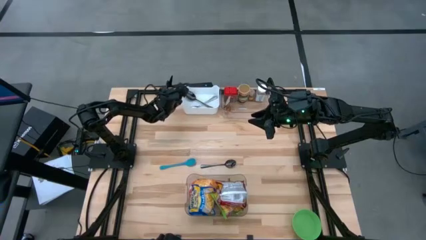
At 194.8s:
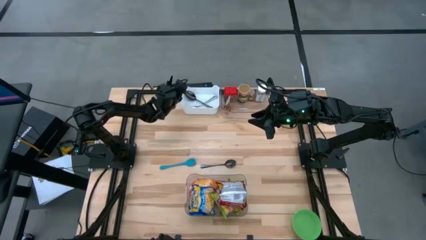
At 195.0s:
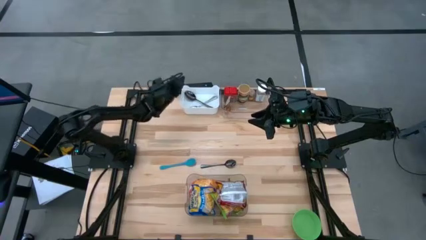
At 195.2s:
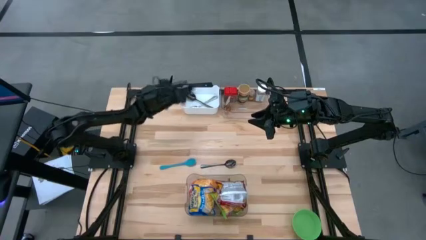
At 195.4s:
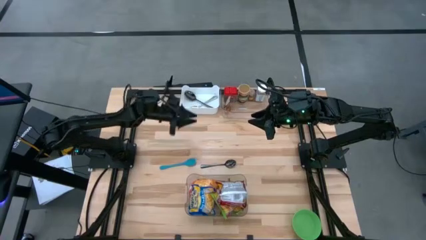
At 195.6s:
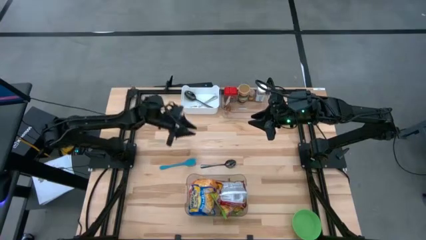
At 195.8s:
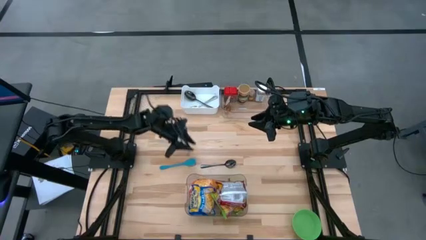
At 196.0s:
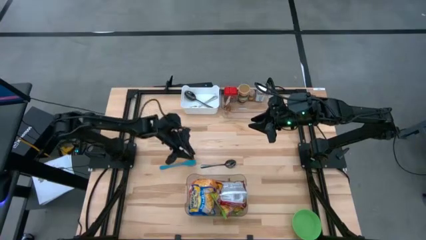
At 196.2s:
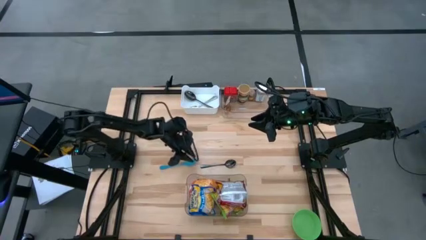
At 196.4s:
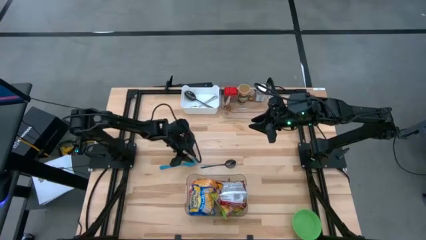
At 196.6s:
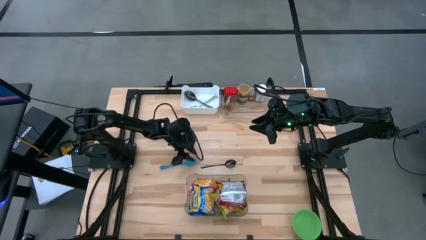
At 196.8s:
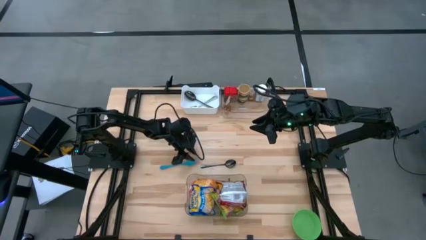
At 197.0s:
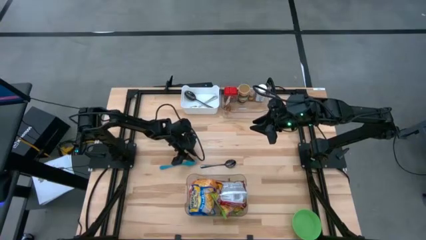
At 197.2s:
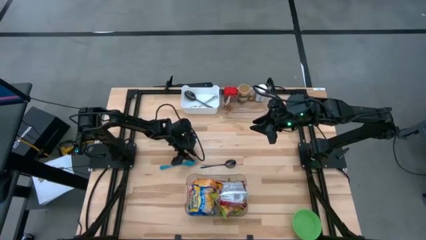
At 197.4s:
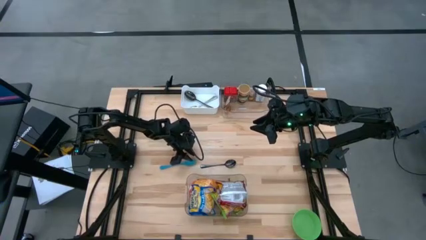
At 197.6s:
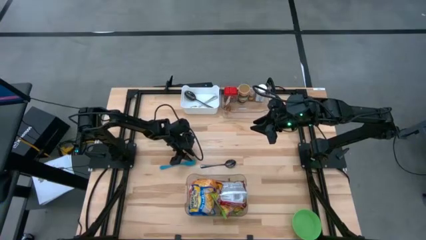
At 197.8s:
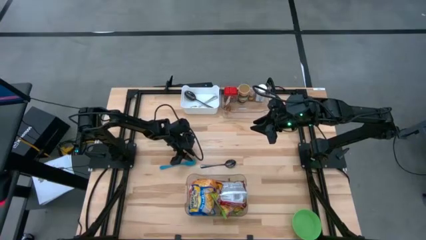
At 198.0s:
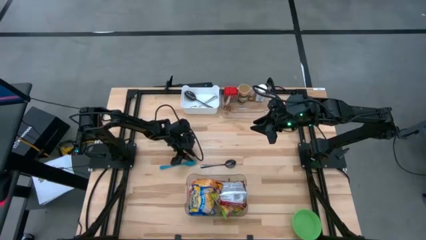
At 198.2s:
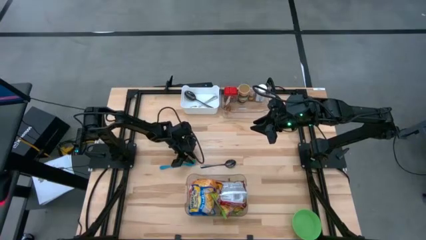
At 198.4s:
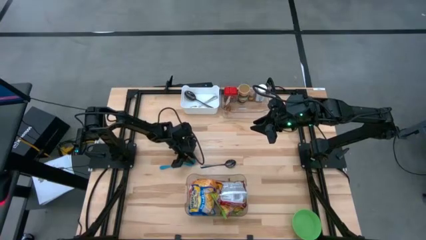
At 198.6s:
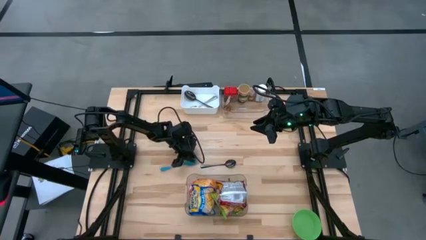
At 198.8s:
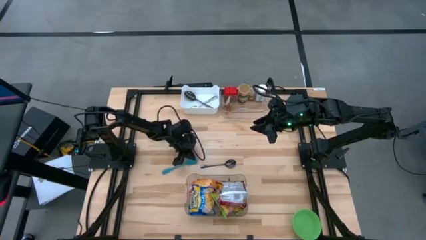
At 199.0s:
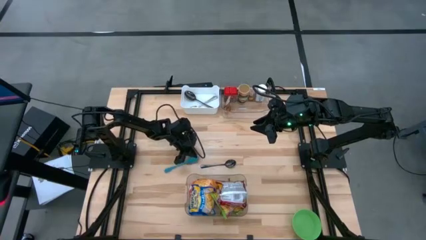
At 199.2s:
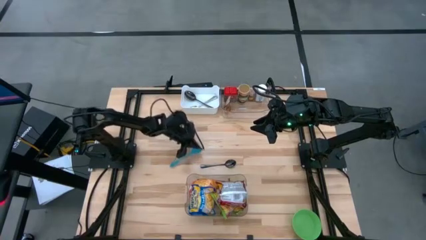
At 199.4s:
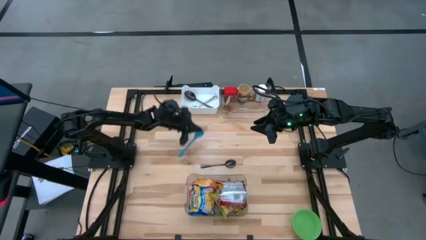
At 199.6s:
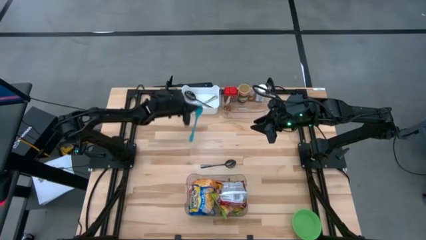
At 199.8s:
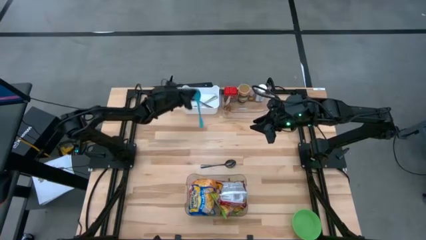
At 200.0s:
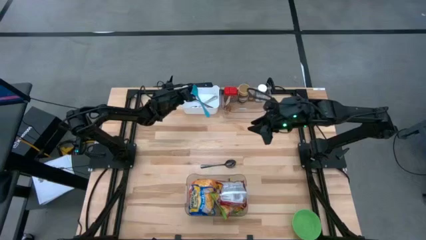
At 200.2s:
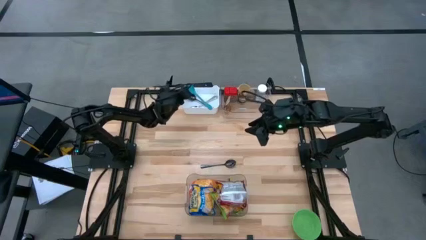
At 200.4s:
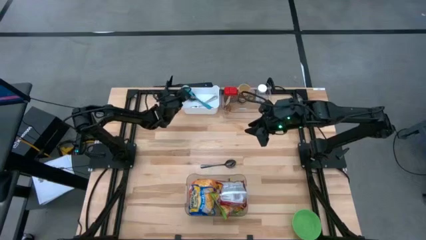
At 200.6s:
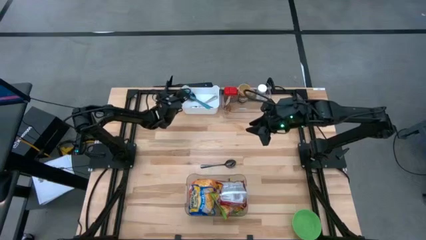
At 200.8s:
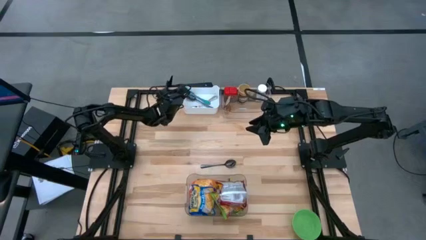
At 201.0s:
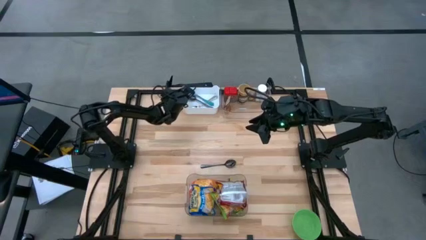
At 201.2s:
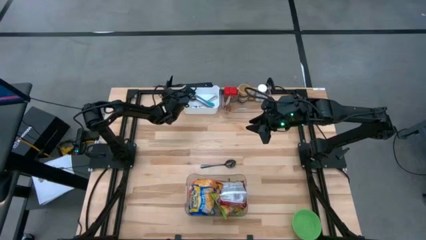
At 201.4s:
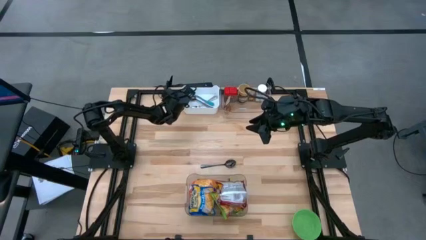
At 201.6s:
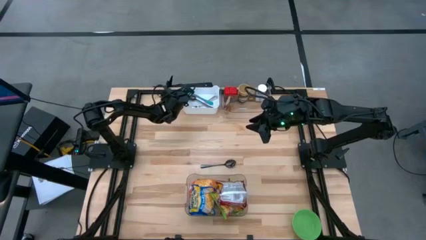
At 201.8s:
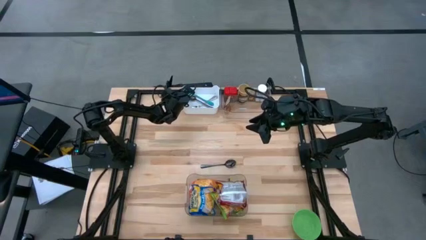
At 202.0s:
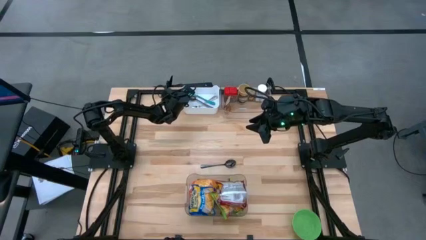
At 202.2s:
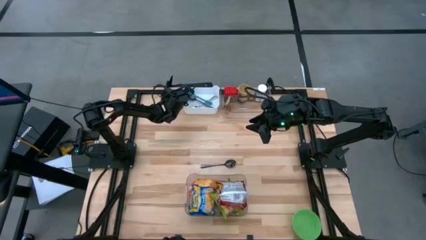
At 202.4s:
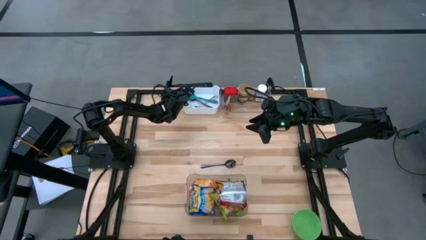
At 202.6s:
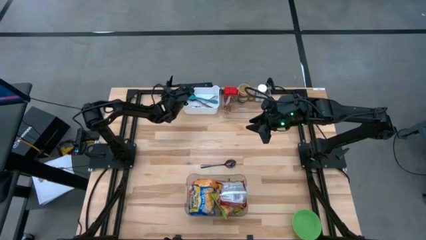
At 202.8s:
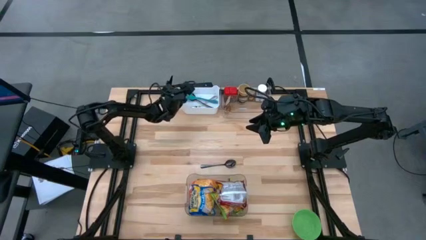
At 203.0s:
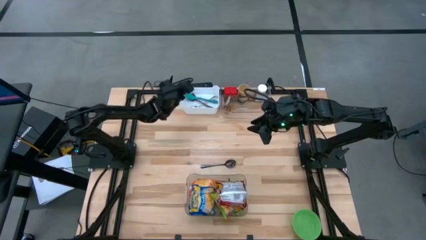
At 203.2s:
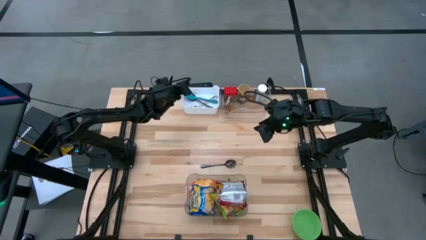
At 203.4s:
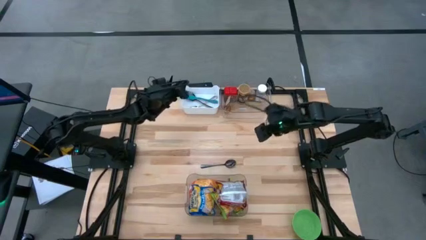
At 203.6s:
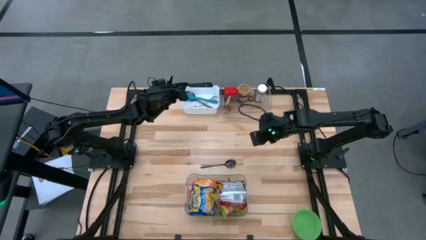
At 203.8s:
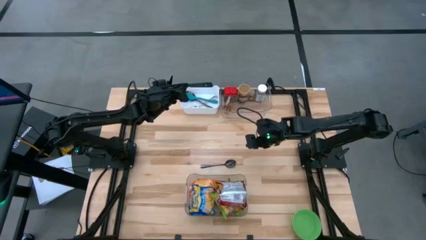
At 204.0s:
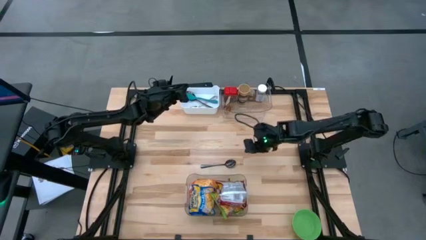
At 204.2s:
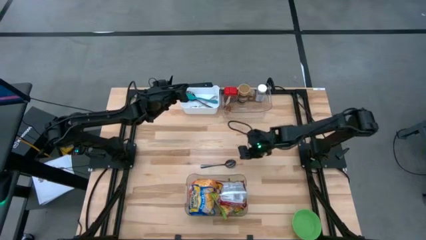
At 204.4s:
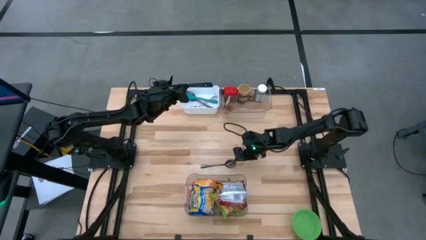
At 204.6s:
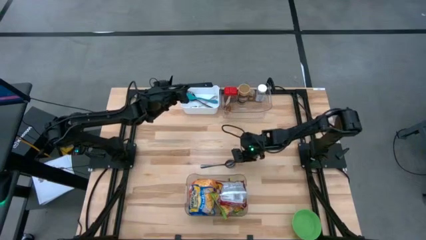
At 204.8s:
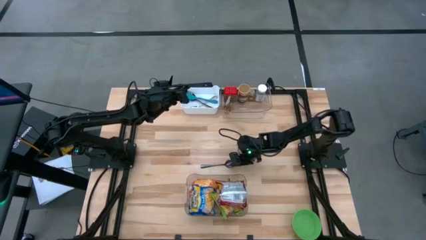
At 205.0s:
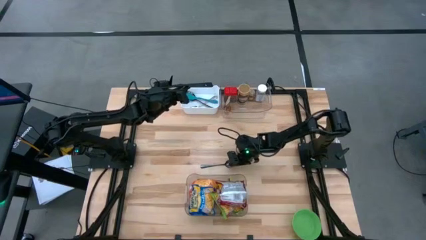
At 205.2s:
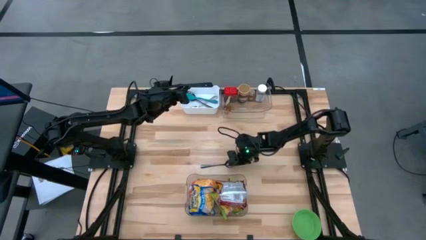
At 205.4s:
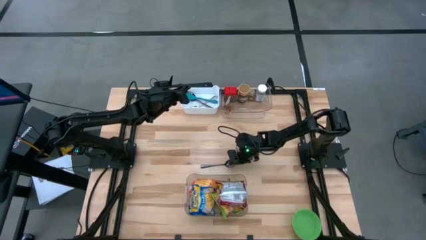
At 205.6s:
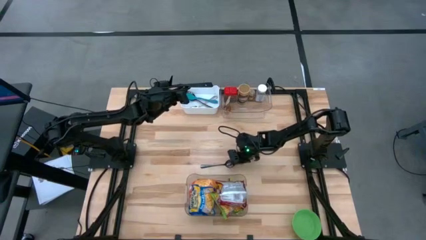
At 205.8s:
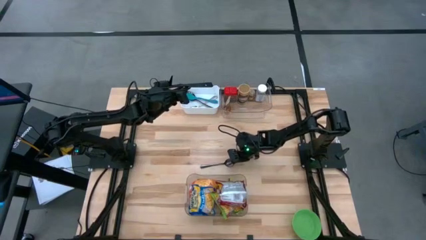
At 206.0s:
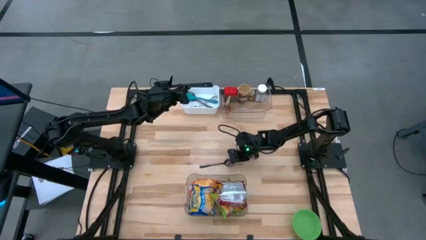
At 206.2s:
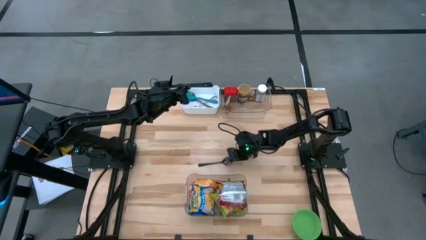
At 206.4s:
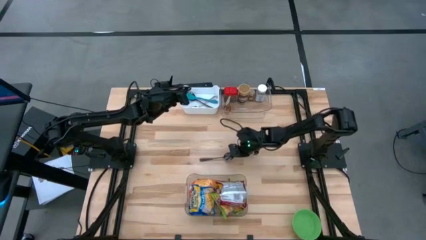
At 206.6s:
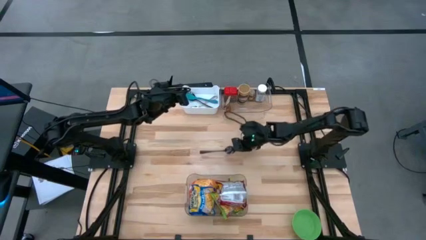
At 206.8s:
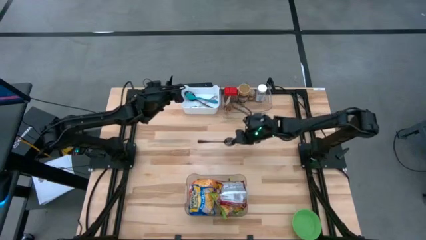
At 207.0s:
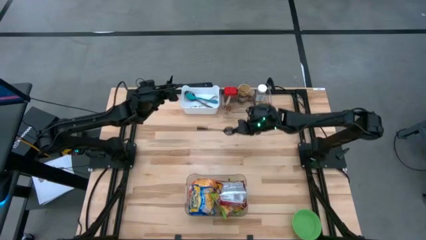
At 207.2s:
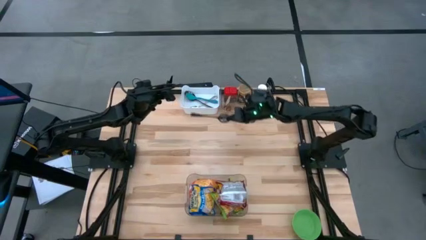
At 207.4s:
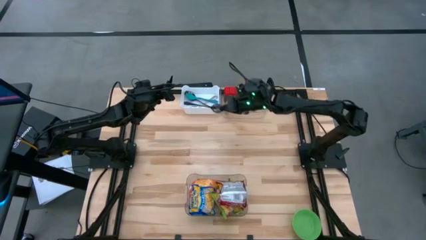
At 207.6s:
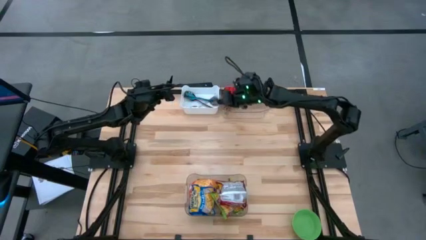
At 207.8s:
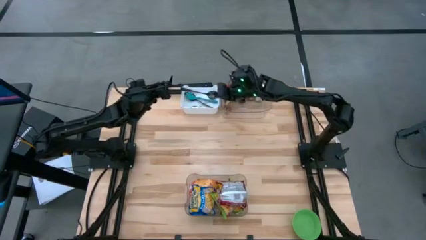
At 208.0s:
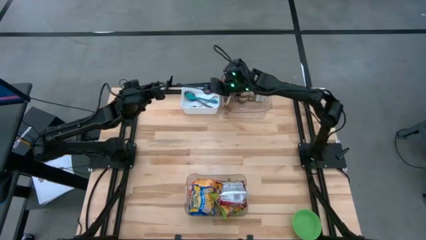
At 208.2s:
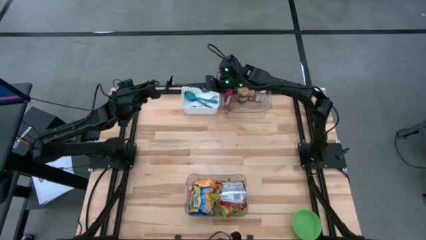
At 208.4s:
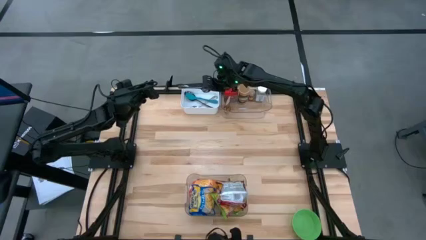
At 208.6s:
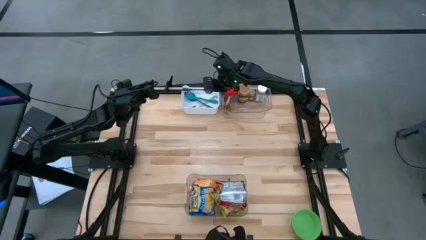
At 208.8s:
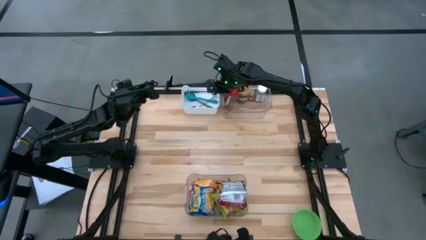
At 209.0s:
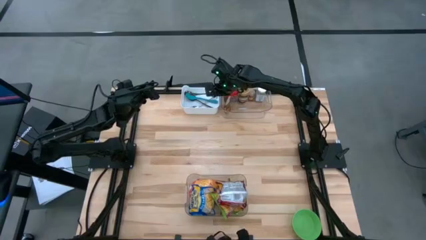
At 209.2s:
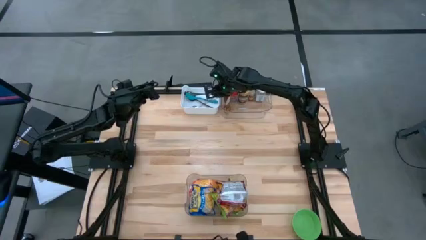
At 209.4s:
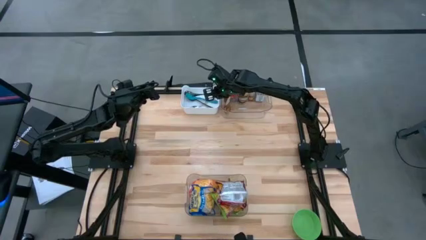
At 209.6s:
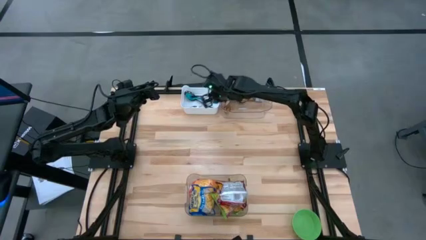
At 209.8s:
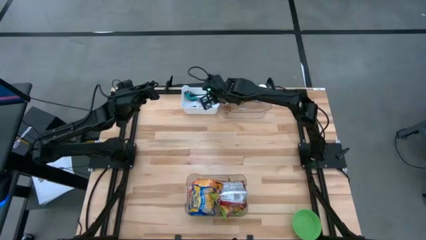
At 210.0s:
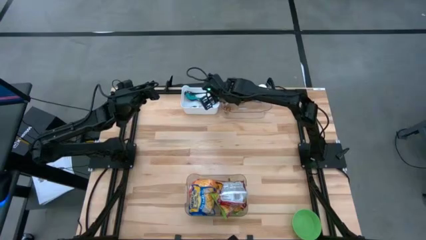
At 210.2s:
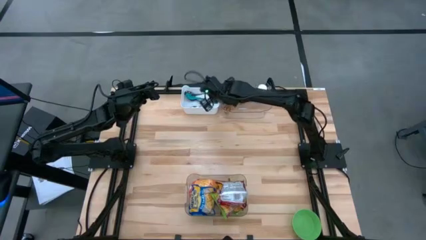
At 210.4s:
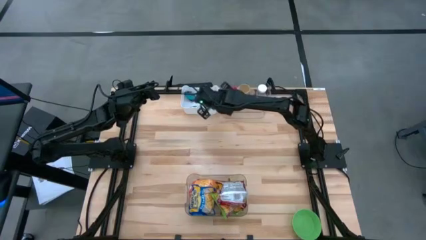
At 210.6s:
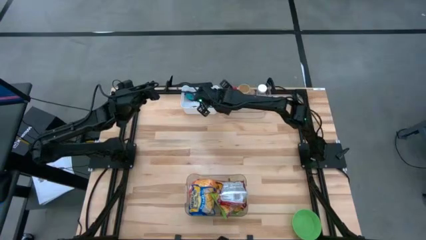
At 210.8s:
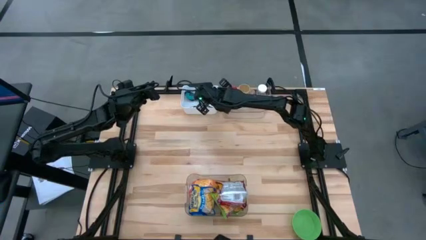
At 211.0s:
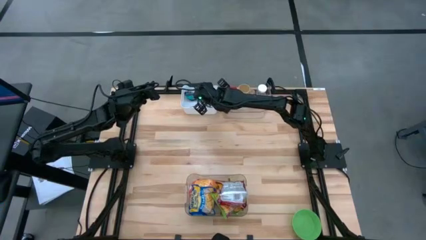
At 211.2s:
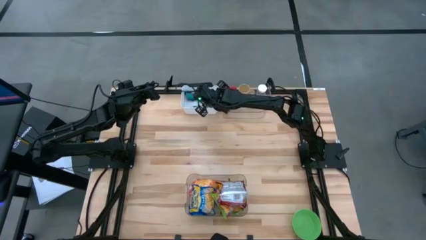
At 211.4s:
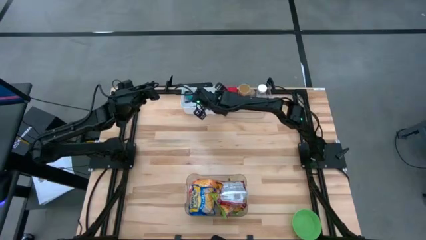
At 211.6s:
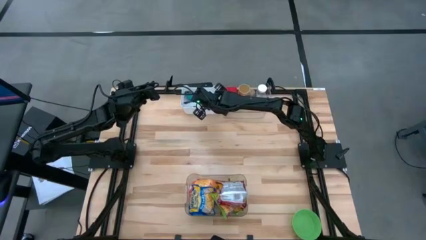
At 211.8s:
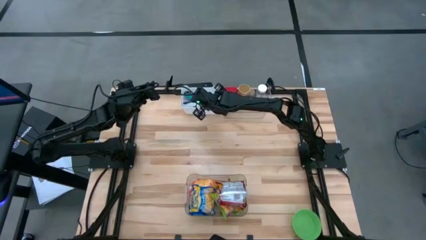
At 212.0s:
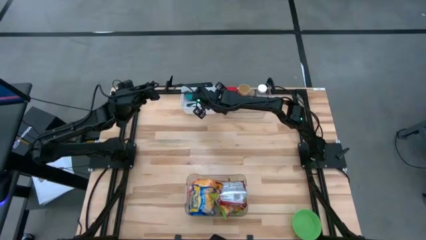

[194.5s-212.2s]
Task: Pick & Place Food Item
Put the blue spoon into the white bin
